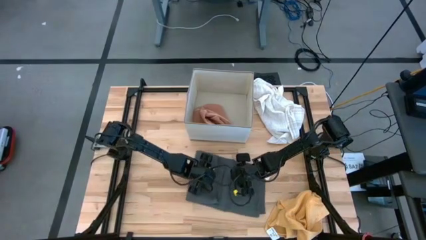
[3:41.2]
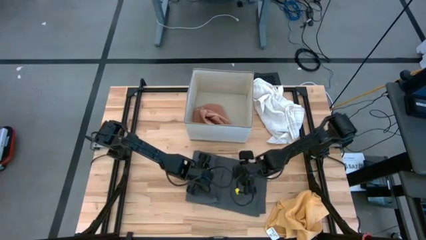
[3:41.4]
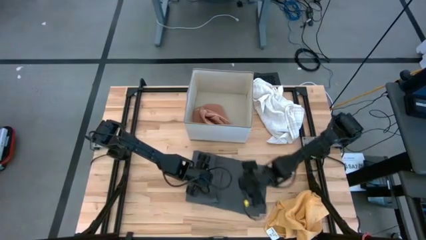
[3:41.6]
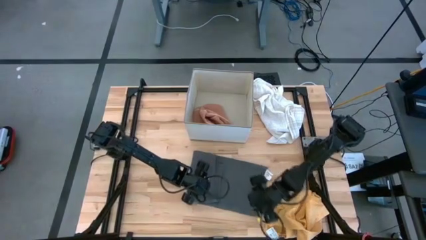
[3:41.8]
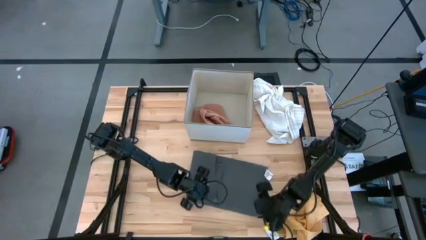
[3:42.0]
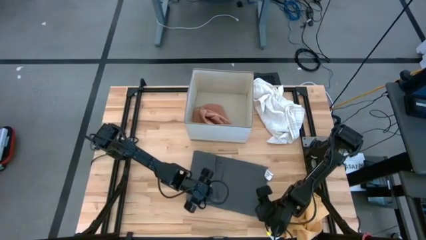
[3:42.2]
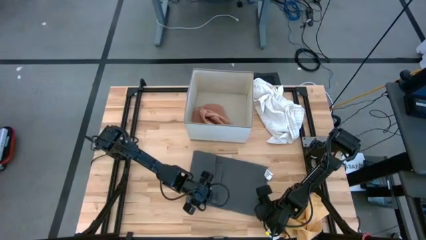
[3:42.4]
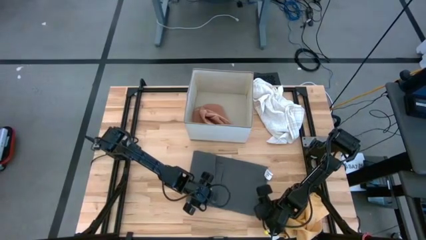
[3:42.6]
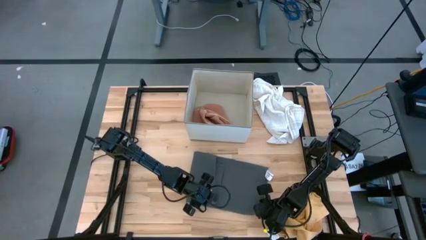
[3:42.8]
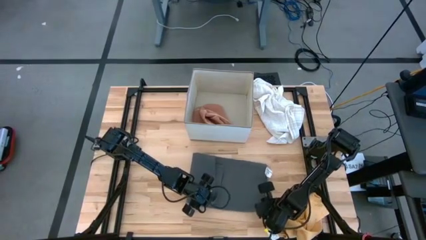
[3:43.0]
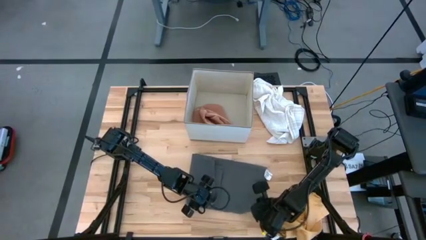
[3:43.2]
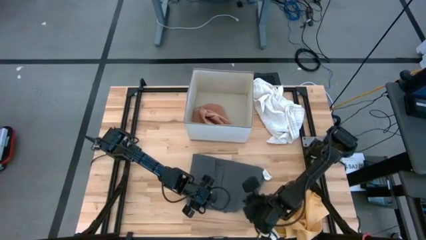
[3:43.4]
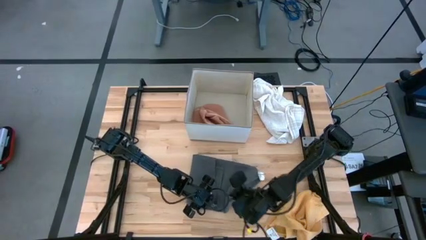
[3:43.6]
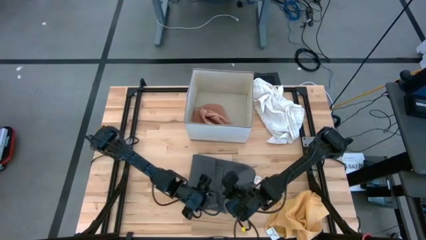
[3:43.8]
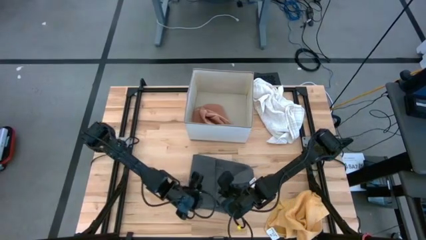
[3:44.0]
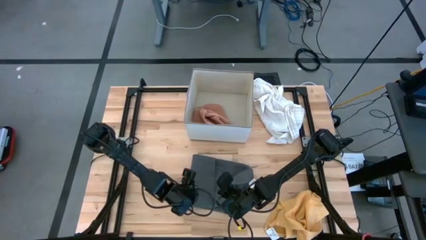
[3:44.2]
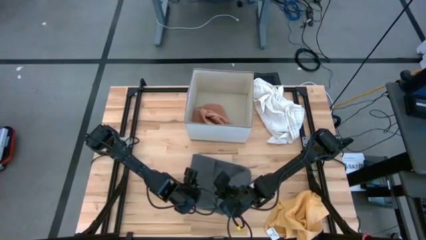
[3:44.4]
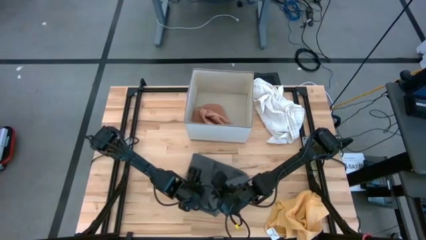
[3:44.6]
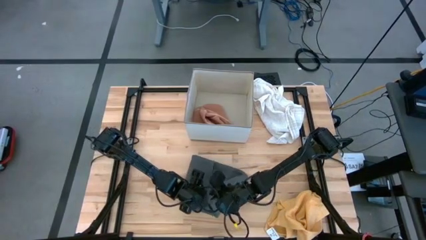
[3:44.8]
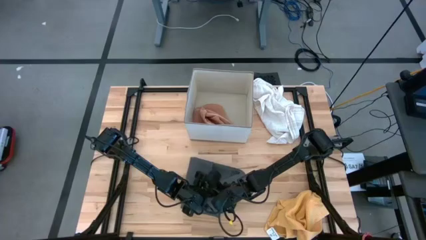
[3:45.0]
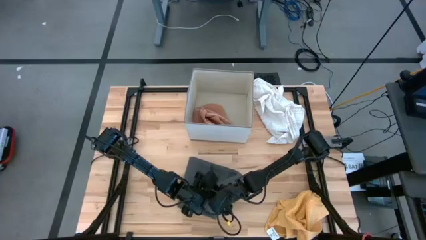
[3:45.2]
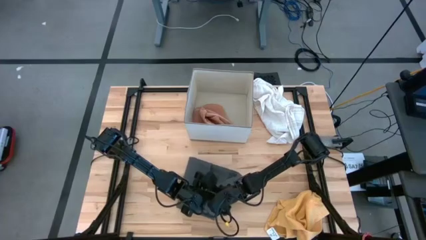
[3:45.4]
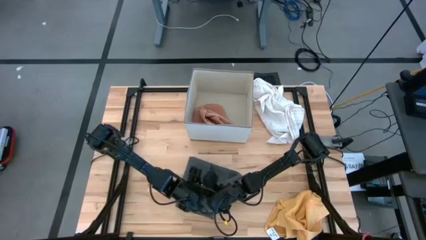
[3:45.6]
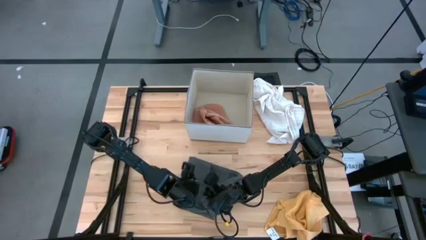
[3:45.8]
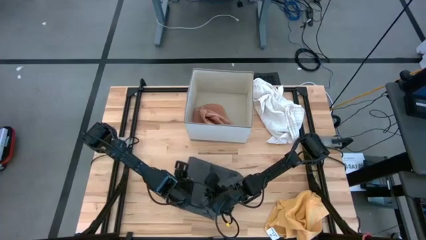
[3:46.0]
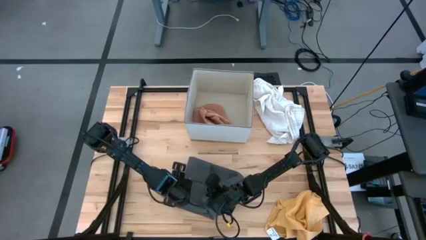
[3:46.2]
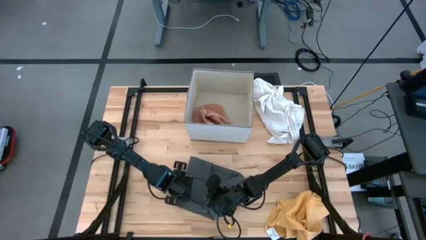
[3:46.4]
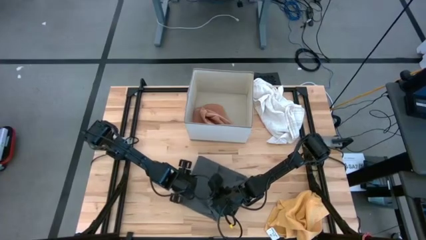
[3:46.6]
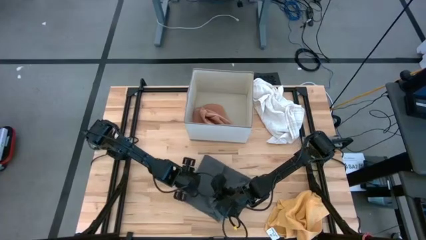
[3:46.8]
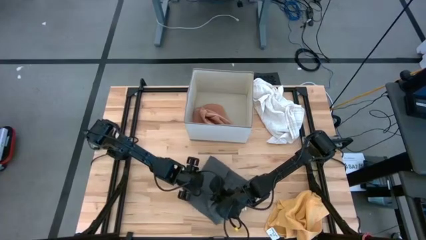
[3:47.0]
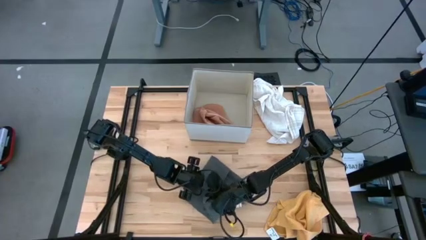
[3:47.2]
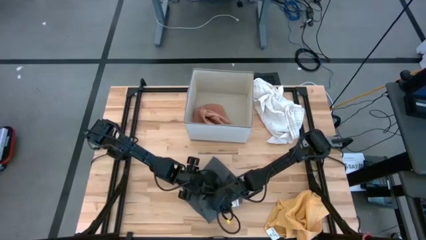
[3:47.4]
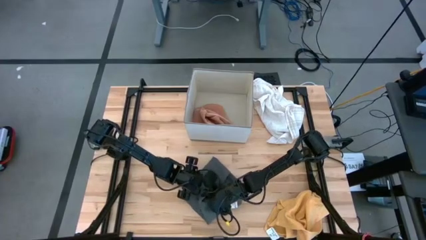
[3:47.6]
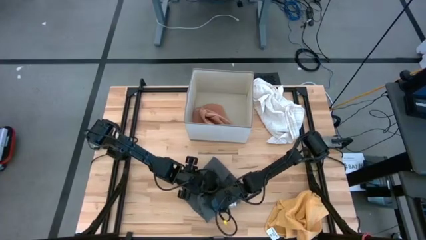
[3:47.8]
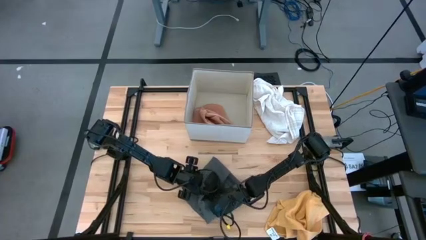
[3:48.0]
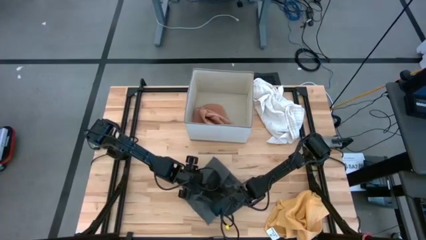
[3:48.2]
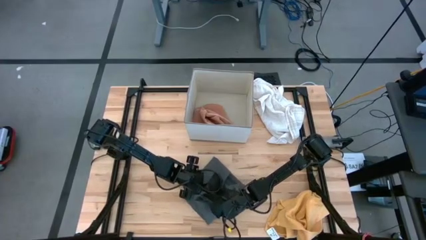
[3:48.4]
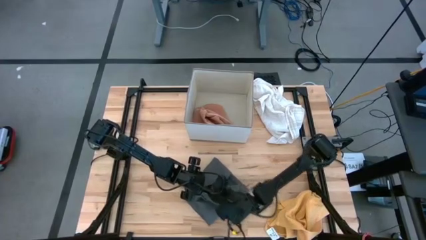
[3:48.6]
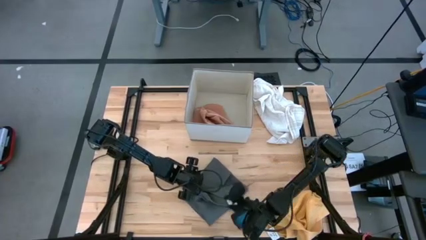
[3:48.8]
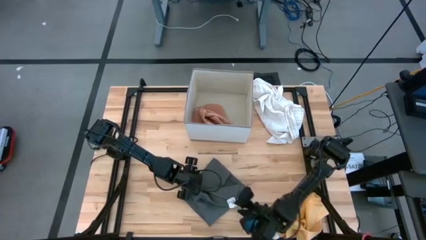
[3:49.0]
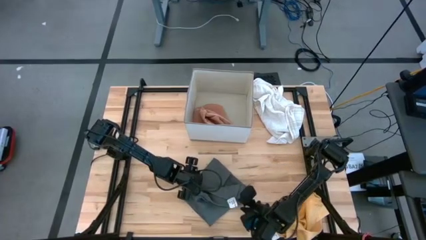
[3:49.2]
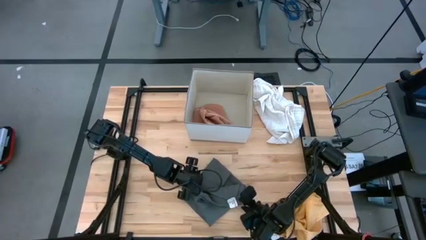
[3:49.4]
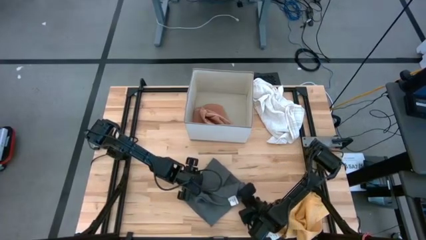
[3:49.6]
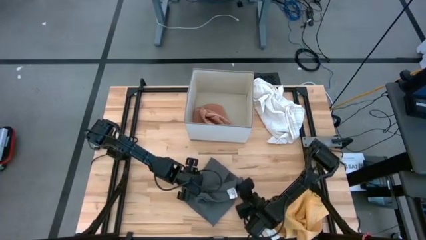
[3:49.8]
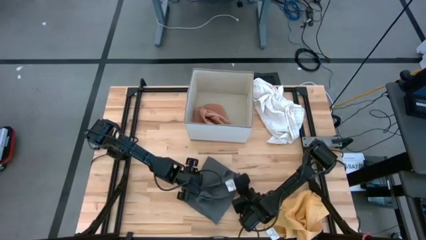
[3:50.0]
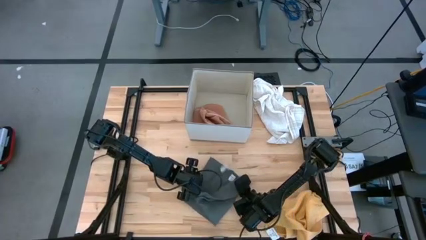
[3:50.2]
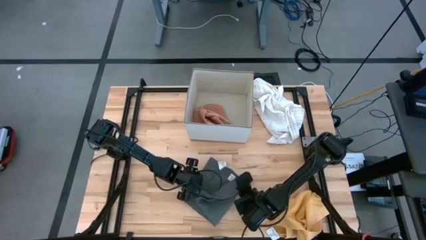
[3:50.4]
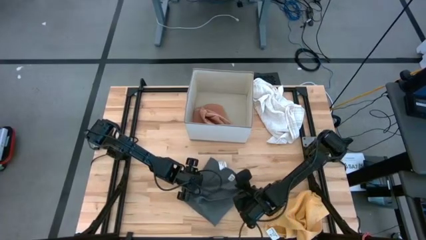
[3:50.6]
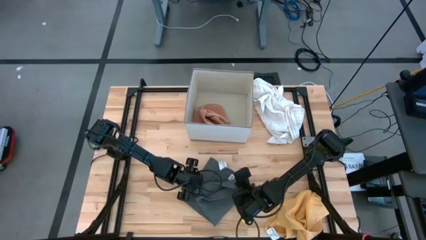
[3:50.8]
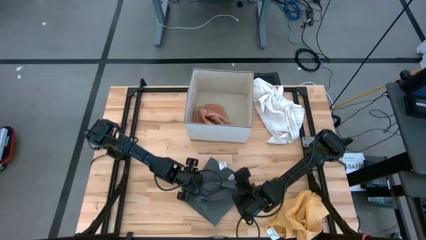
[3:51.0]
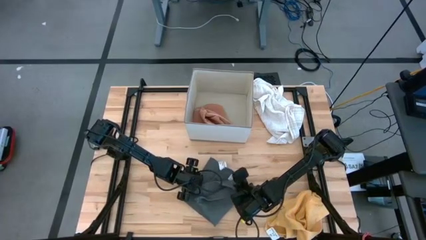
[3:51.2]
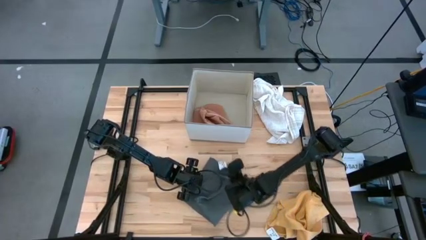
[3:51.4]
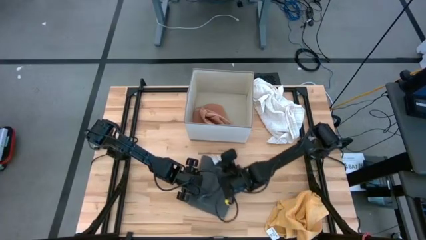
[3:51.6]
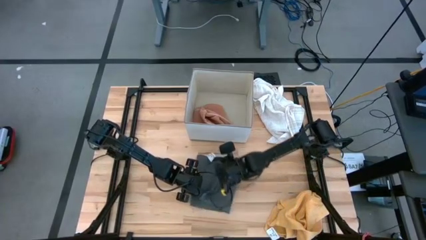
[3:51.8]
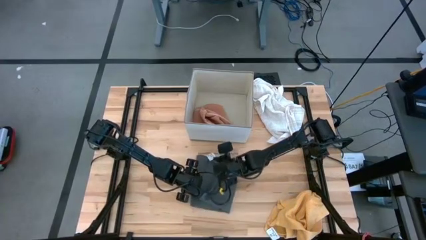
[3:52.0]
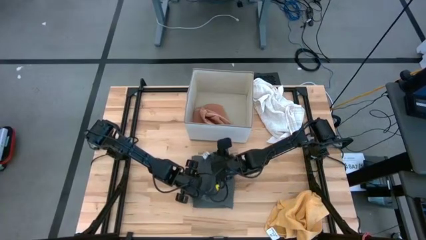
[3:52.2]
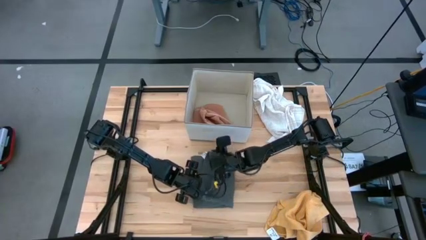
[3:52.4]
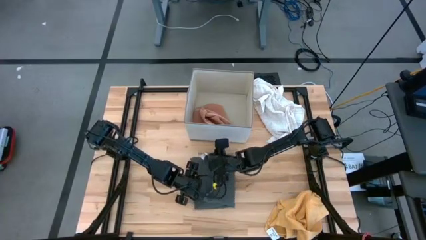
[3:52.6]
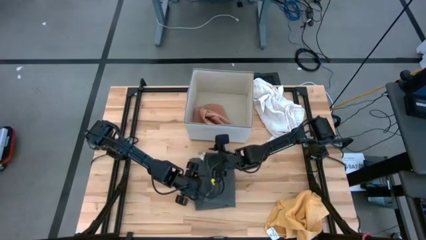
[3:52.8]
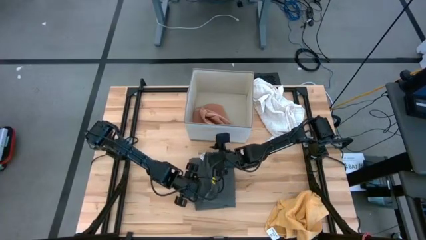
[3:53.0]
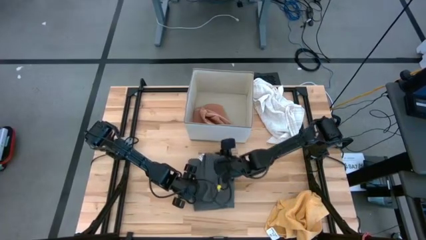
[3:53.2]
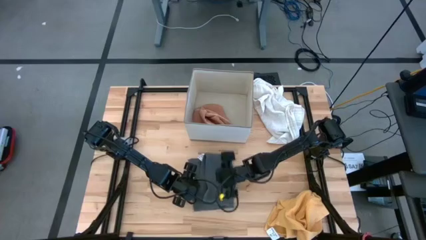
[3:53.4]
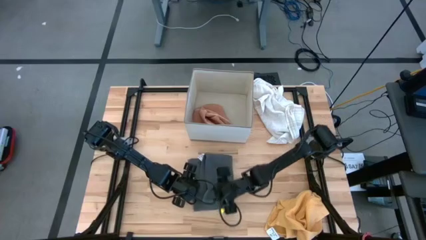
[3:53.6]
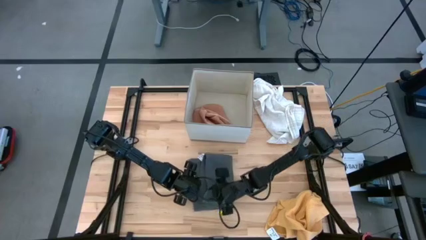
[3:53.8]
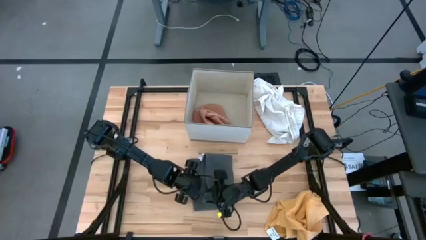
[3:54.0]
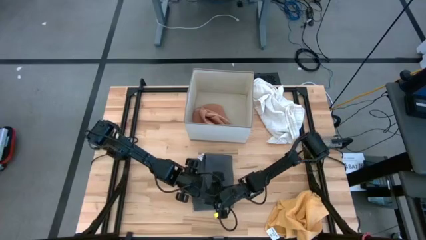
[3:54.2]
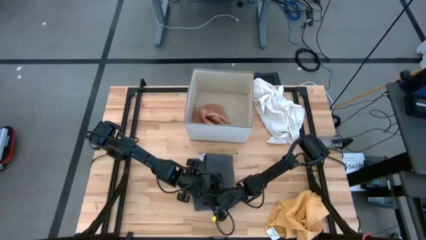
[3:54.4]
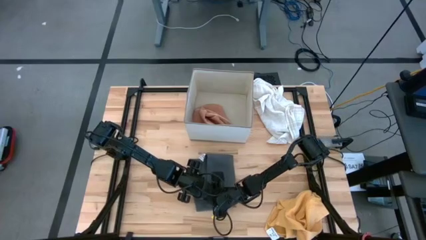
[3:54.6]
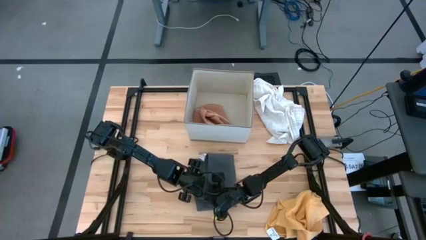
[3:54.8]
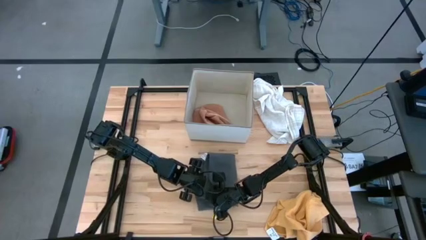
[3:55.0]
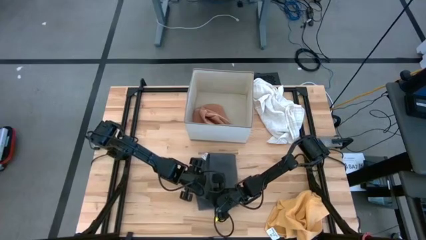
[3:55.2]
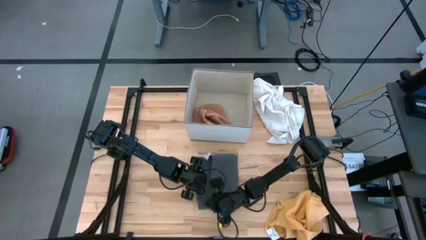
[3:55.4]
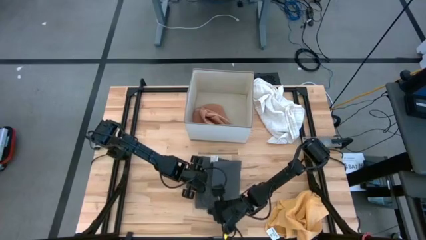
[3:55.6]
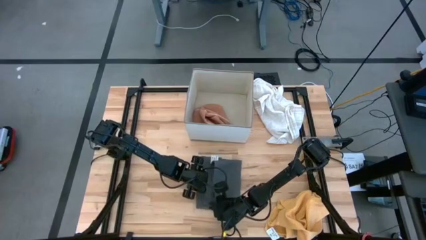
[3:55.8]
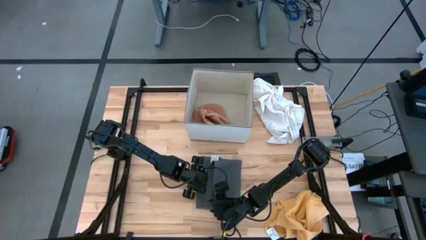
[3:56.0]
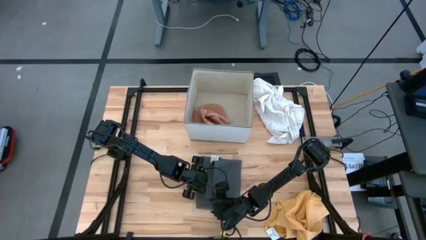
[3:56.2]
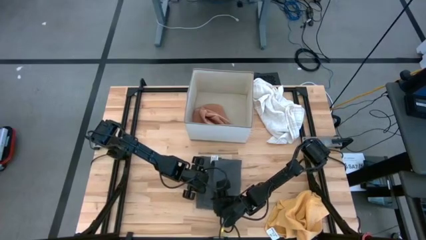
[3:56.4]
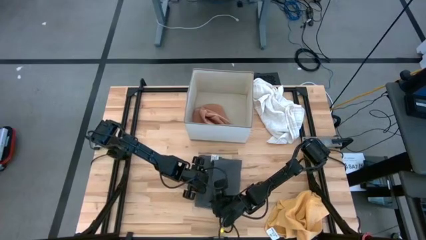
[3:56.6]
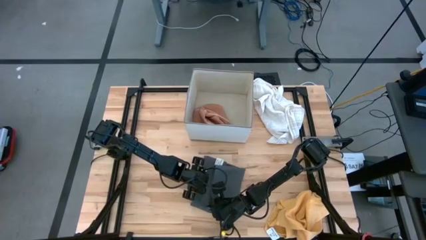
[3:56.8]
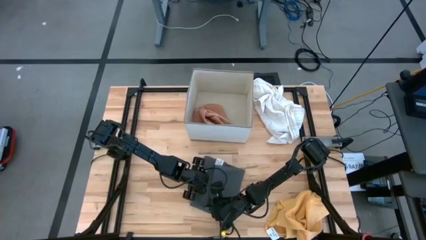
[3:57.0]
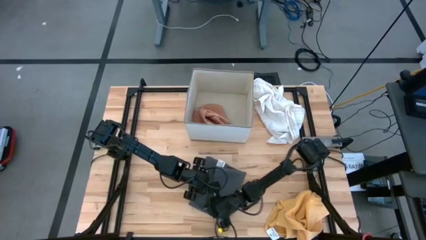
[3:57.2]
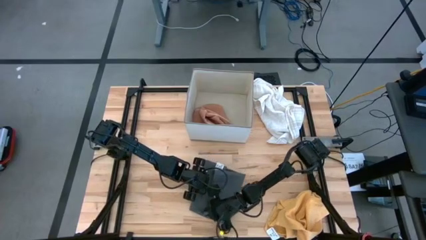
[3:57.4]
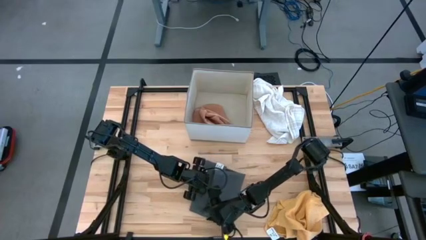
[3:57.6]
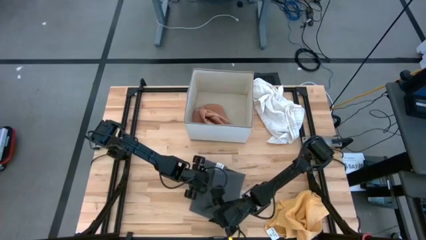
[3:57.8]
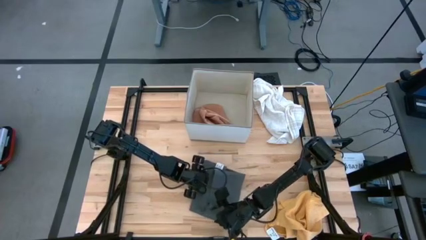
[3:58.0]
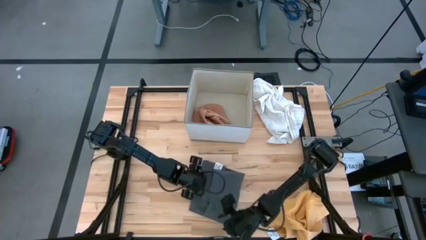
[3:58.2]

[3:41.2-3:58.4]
Task: Fold towel
Fold the gray towel
